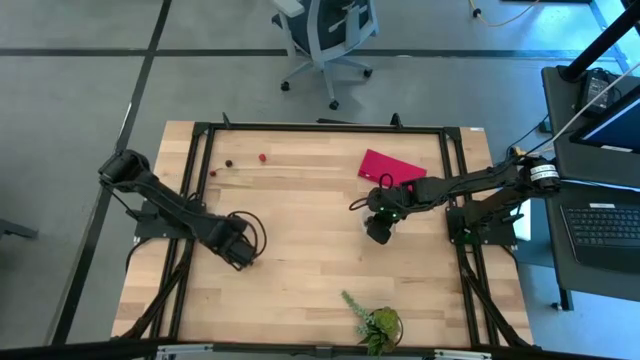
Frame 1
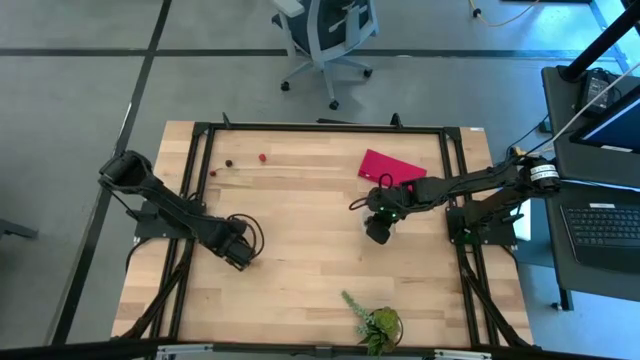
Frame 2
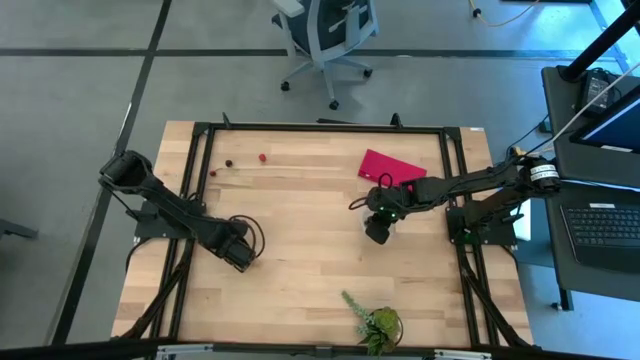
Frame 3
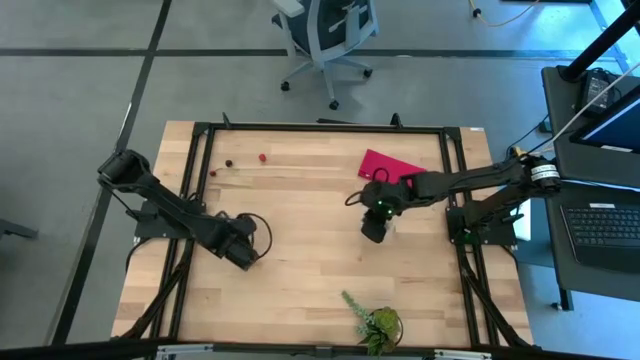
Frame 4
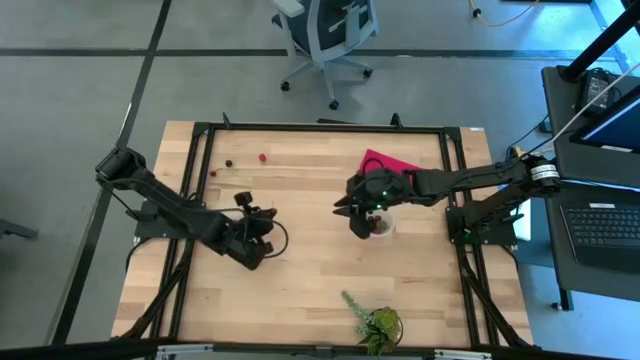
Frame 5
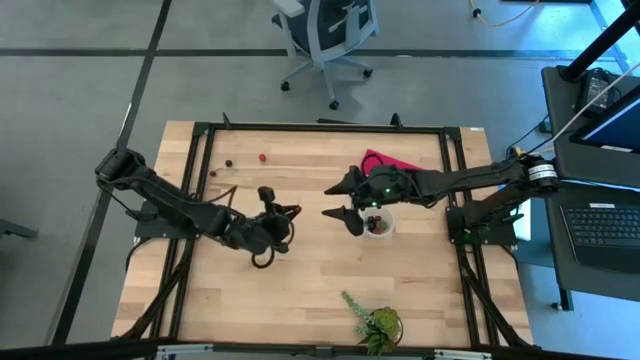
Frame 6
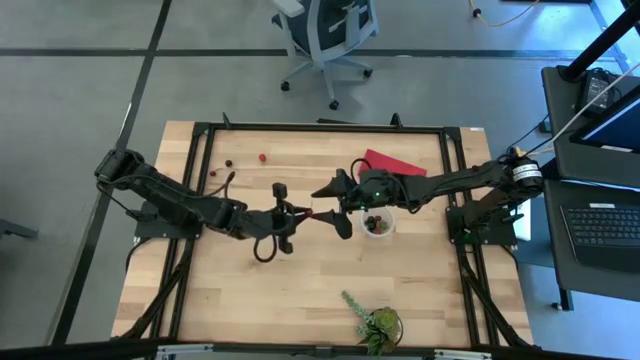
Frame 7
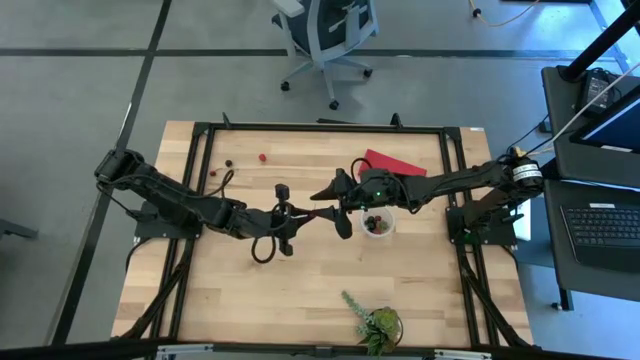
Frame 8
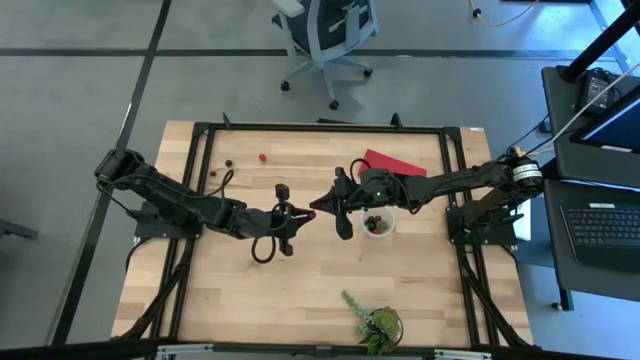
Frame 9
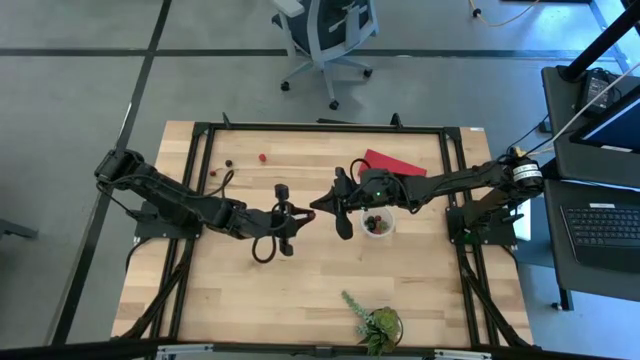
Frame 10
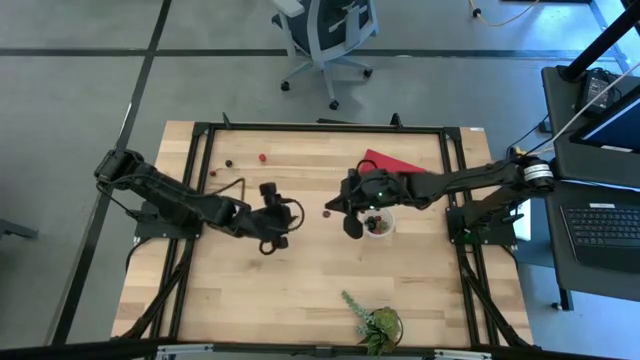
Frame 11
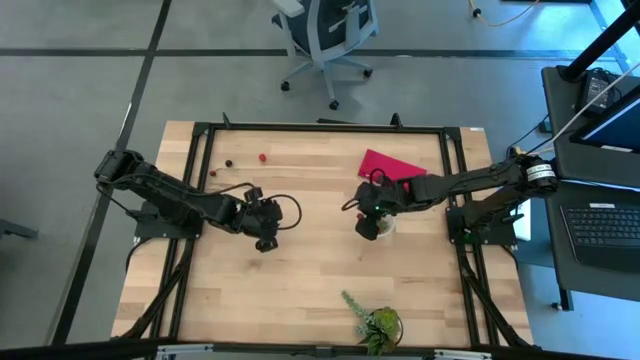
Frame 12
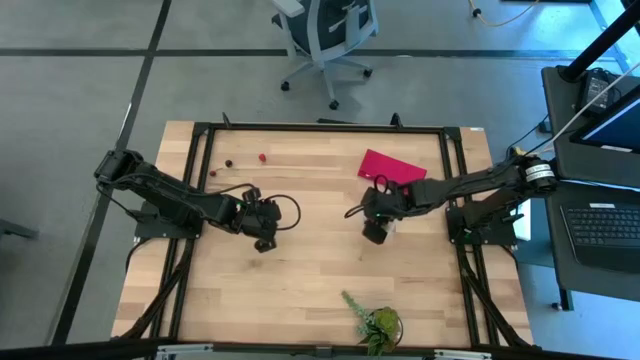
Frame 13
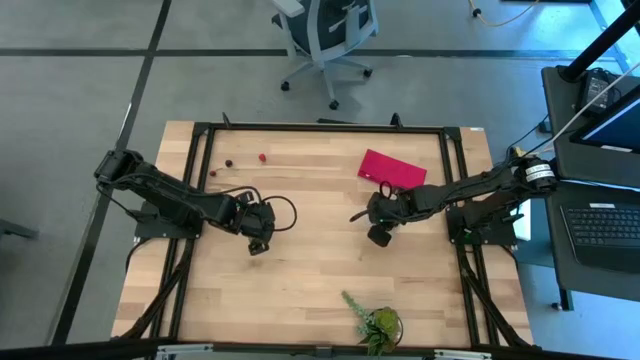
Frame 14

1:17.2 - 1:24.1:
Task: Pick and placing Produce into tupperware
Put the bottom red cherry into the transparent container

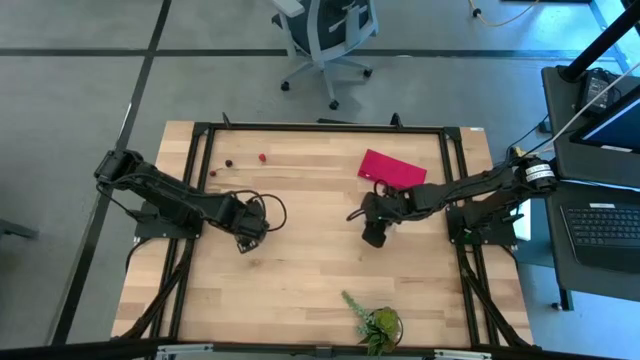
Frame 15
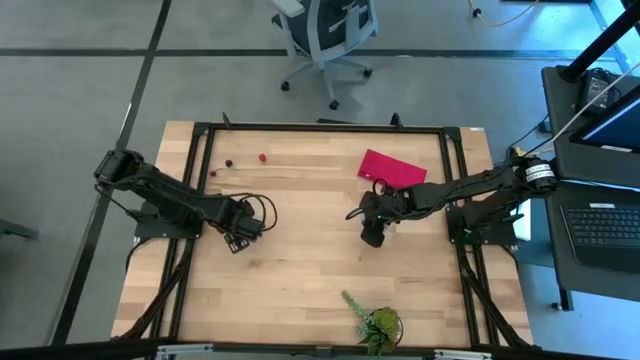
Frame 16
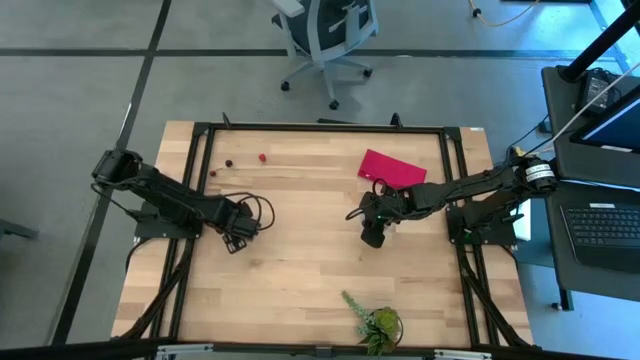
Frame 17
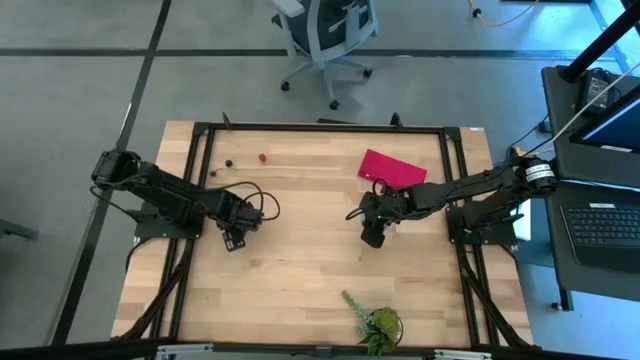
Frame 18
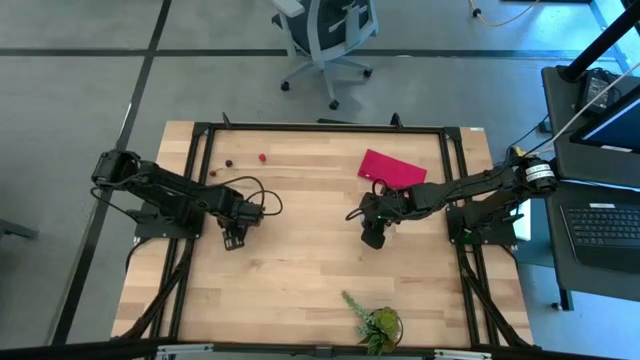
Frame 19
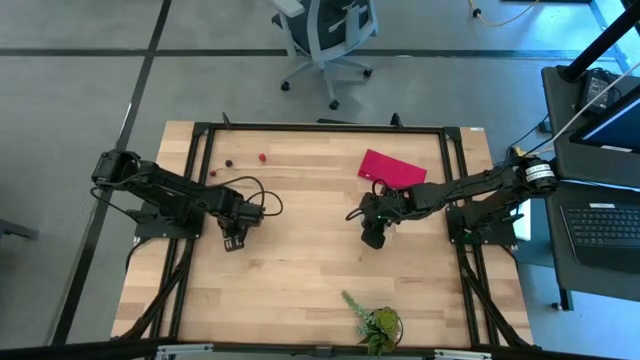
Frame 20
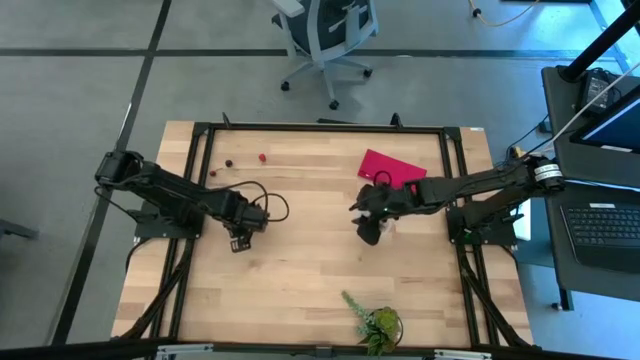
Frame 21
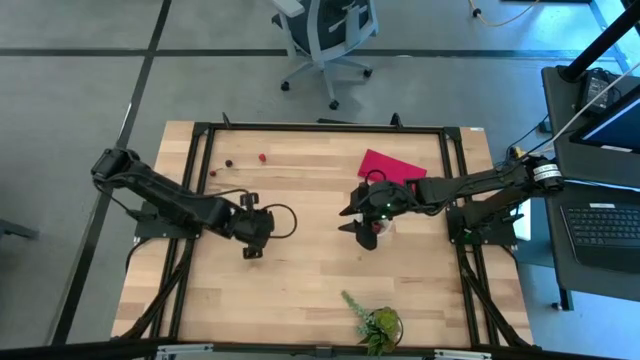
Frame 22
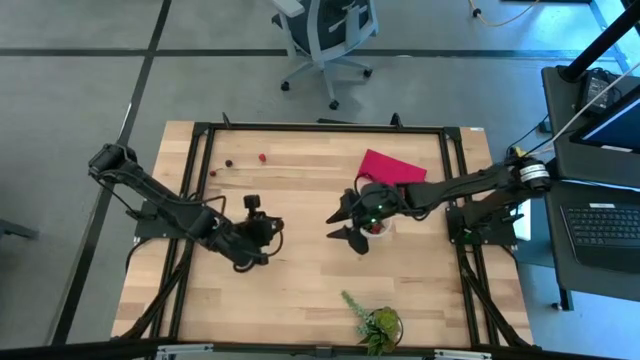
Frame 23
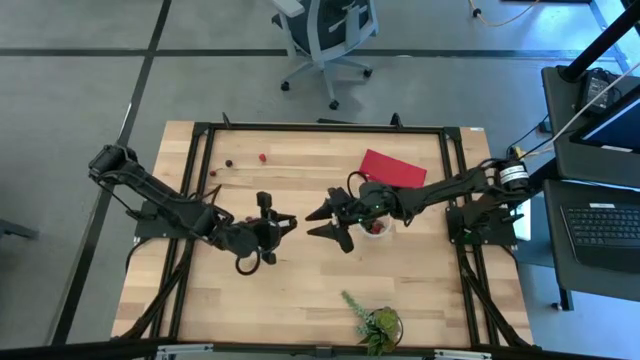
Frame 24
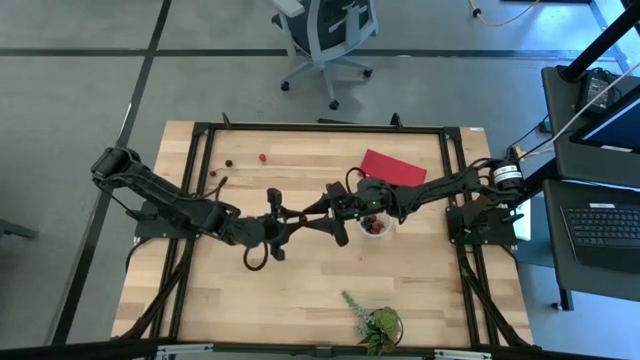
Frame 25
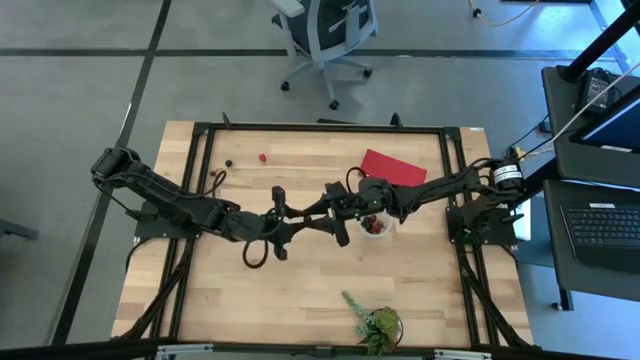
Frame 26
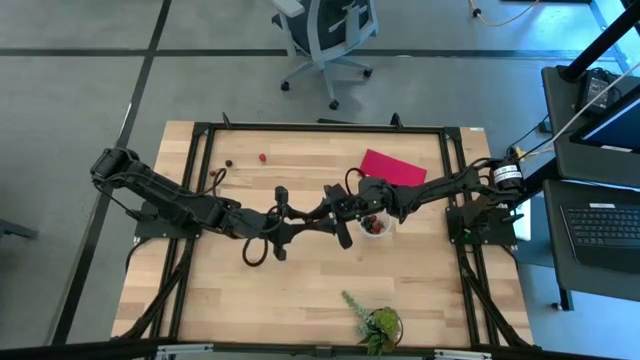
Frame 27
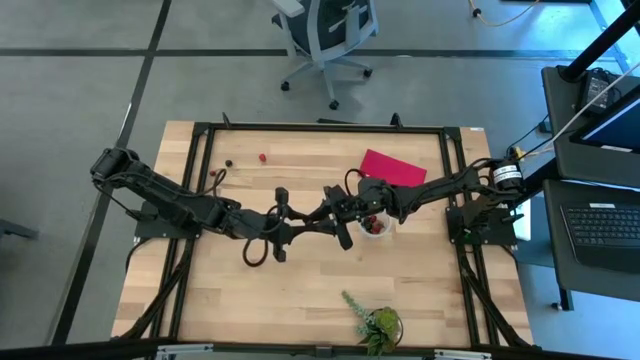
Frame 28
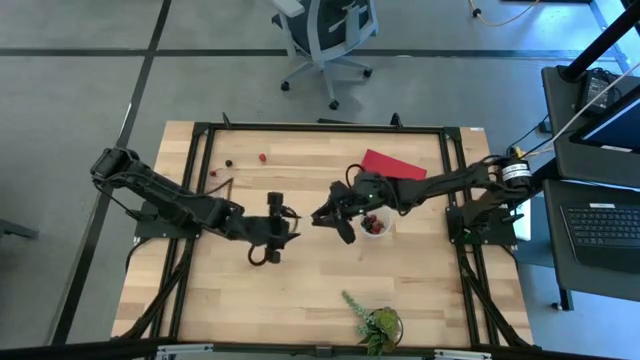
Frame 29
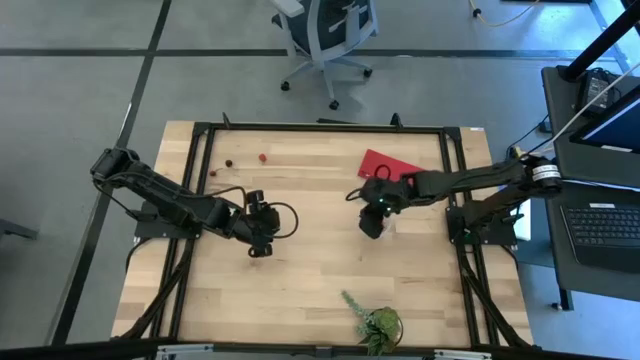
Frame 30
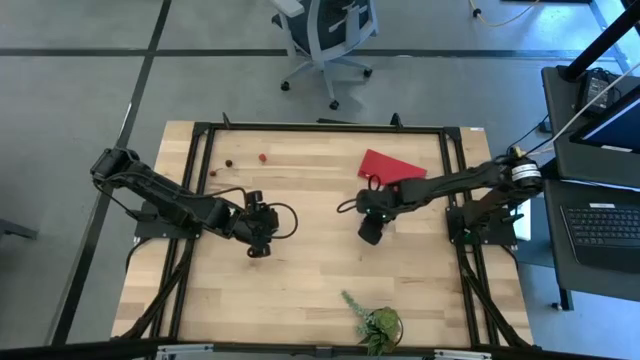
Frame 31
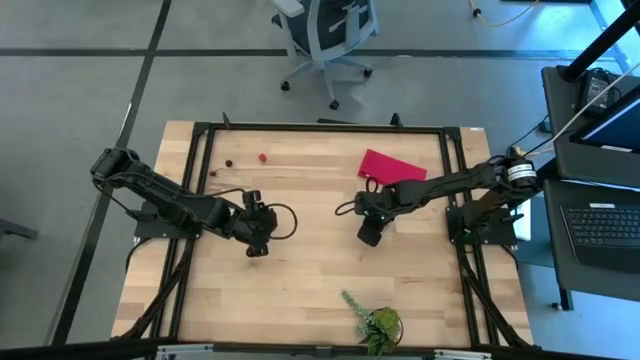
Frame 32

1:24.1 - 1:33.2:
Put the blackberry into the transparent container

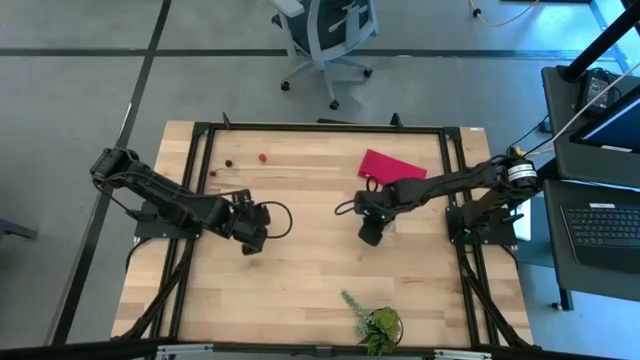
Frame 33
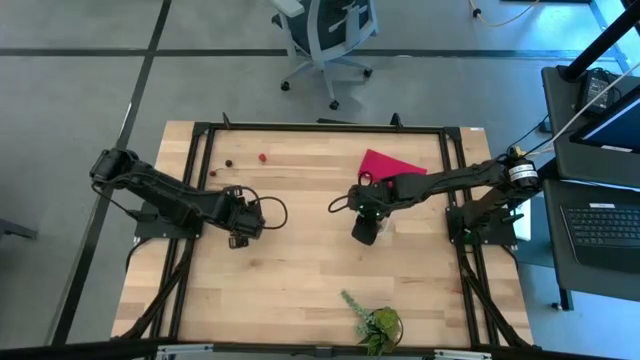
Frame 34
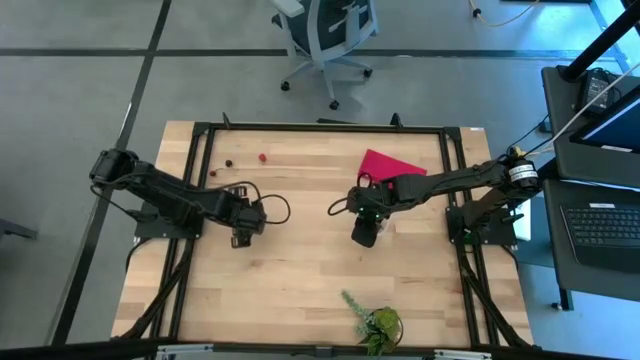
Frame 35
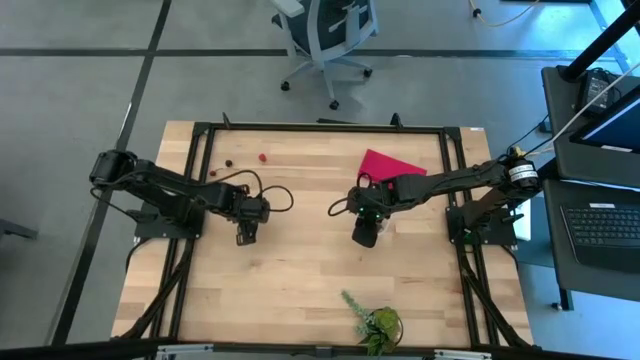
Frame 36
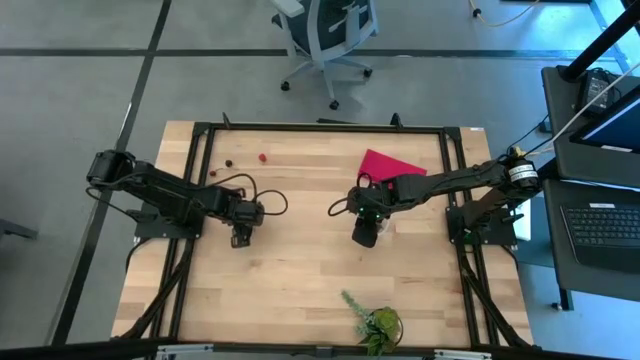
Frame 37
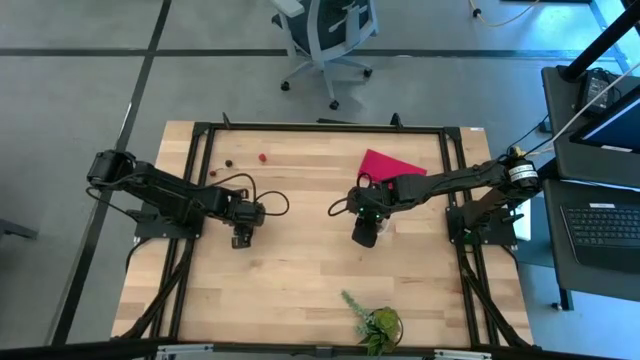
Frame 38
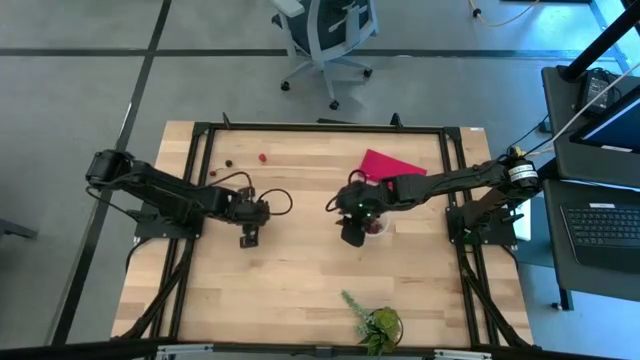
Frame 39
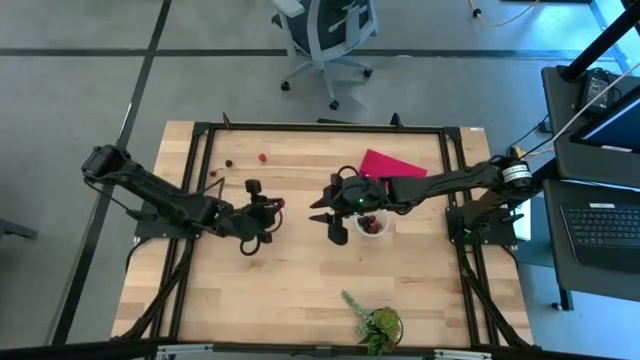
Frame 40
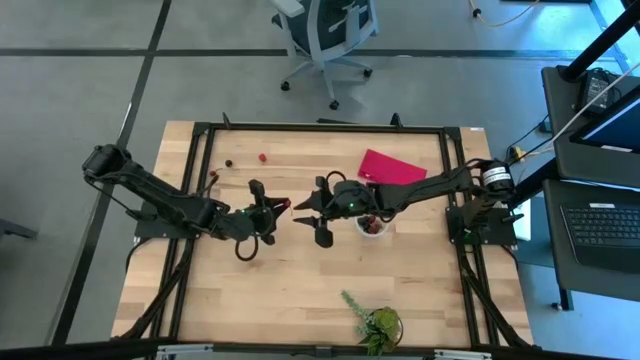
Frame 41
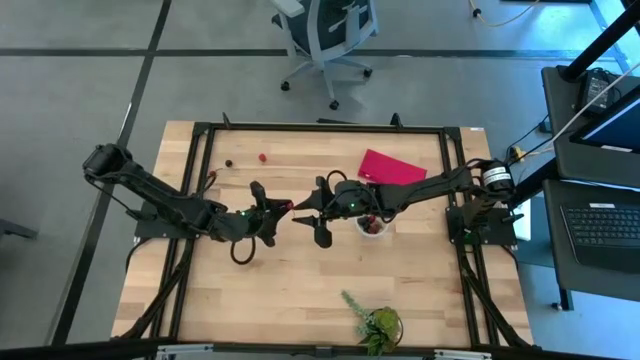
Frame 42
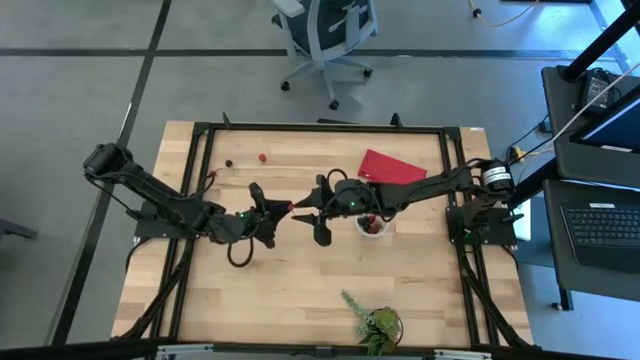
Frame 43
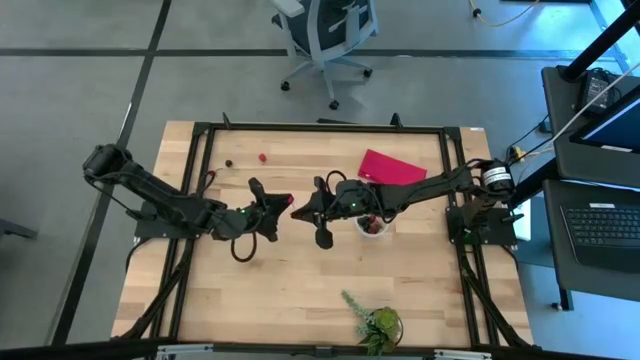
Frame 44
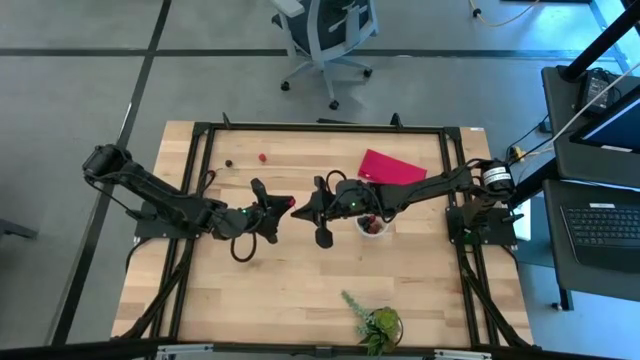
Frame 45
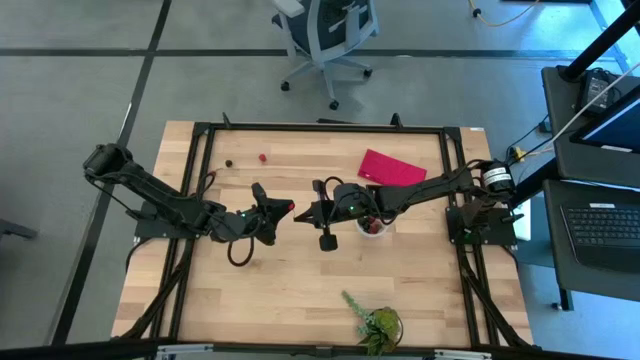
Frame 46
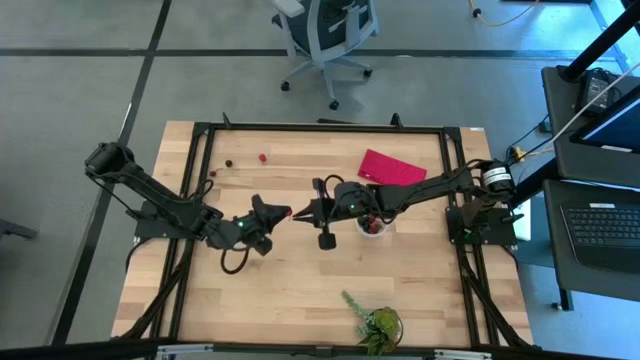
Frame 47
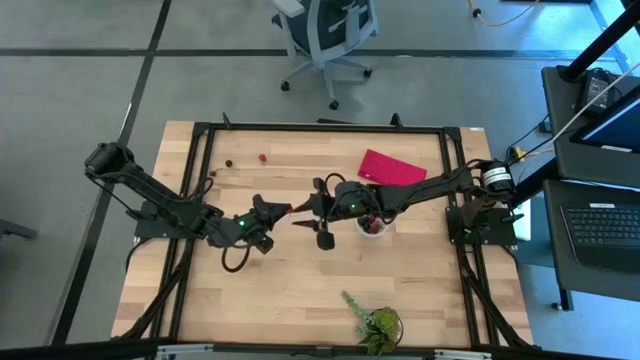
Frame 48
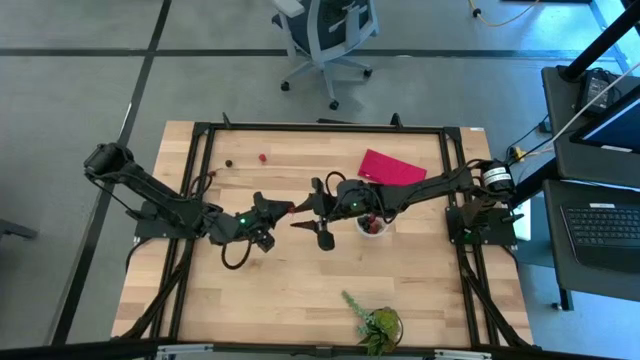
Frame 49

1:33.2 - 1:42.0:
Put the bottom red cherry into the transparent container
